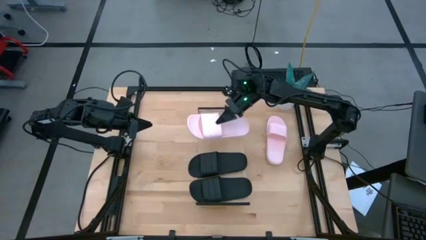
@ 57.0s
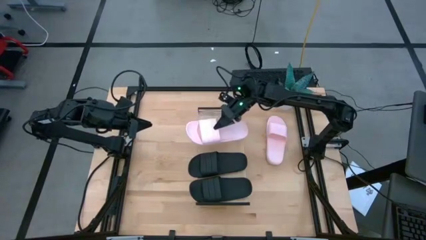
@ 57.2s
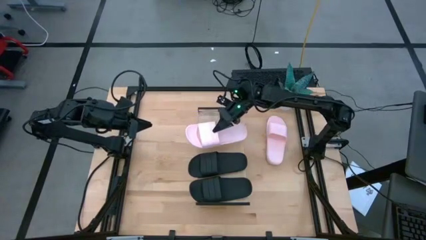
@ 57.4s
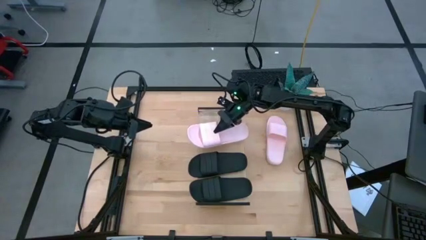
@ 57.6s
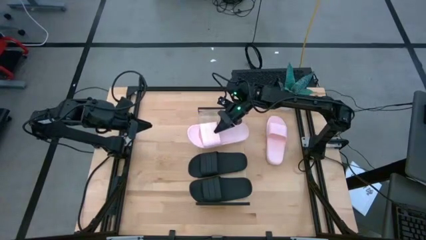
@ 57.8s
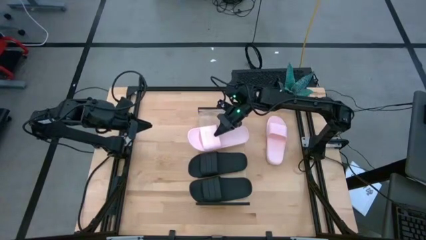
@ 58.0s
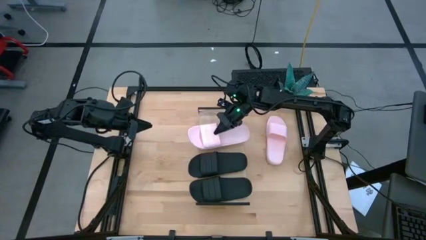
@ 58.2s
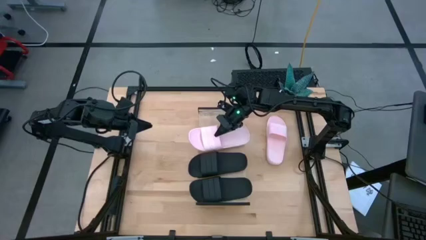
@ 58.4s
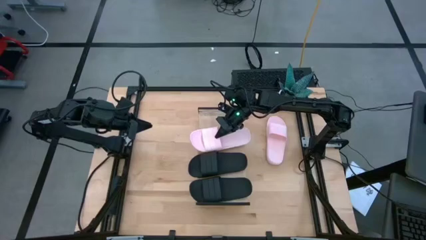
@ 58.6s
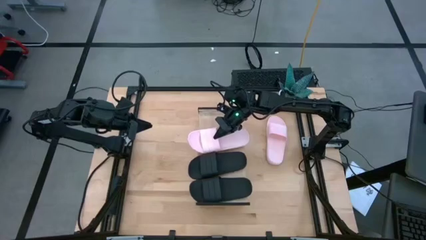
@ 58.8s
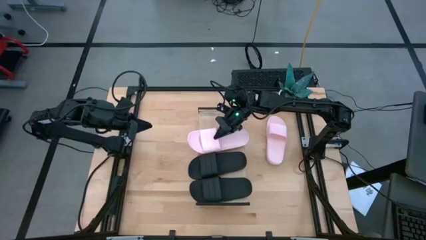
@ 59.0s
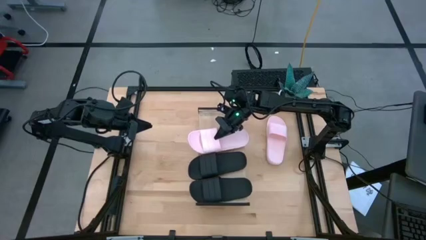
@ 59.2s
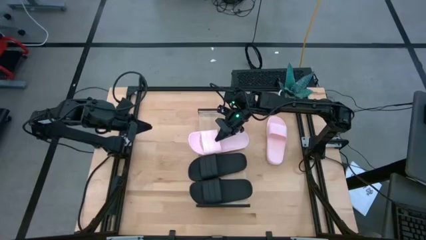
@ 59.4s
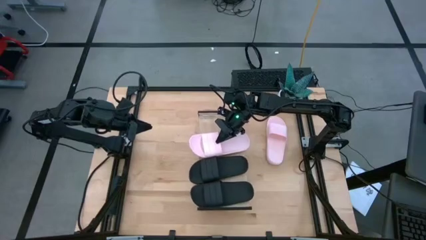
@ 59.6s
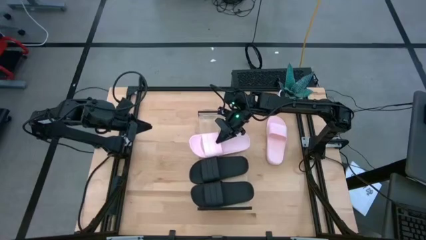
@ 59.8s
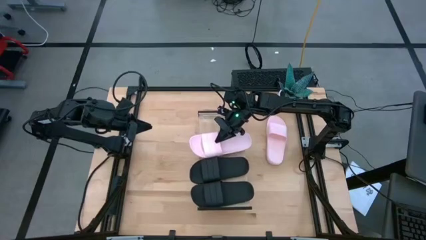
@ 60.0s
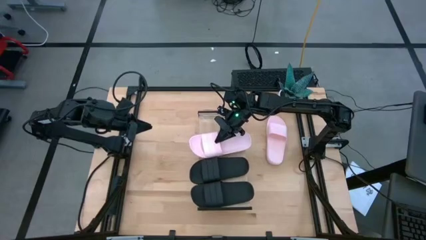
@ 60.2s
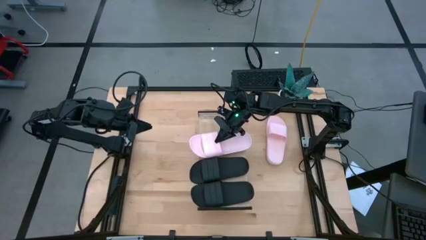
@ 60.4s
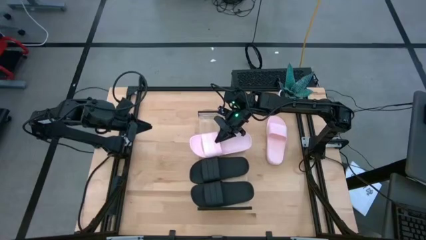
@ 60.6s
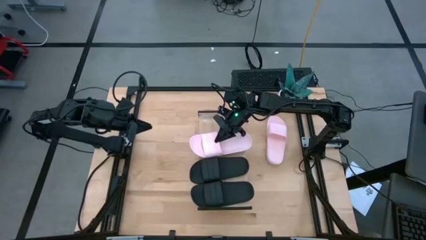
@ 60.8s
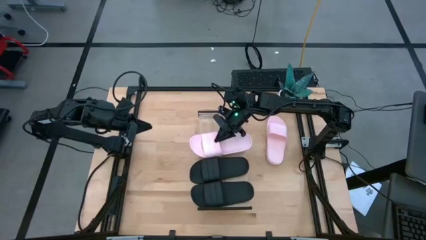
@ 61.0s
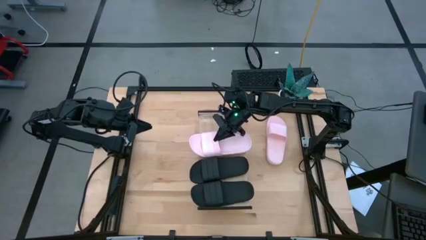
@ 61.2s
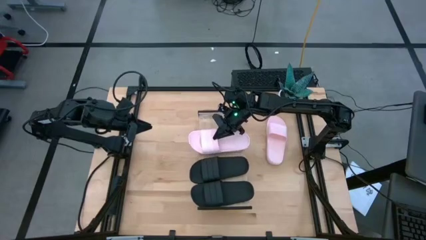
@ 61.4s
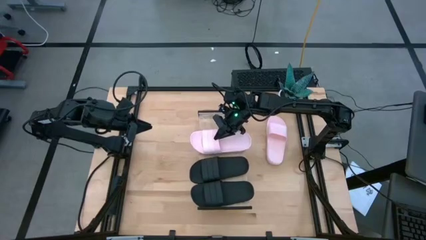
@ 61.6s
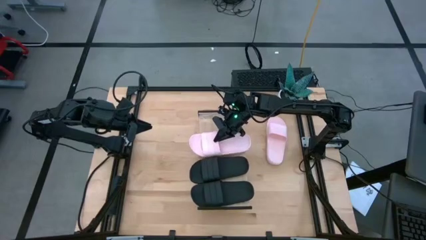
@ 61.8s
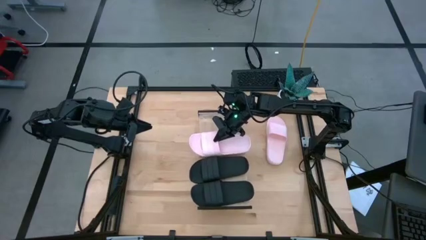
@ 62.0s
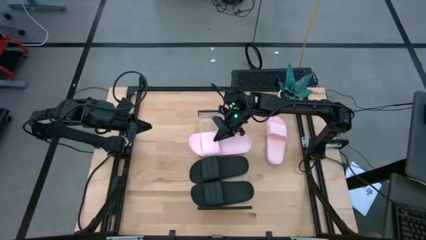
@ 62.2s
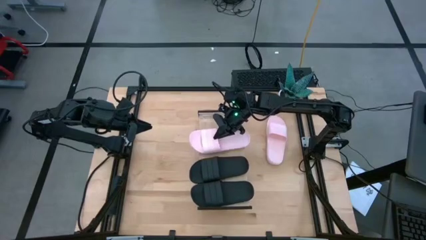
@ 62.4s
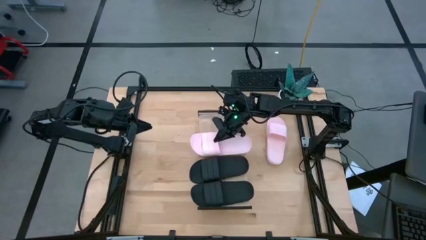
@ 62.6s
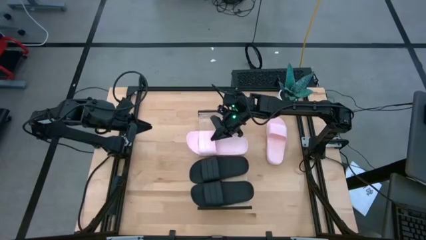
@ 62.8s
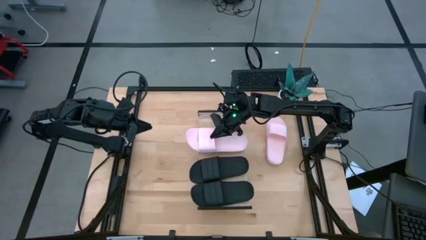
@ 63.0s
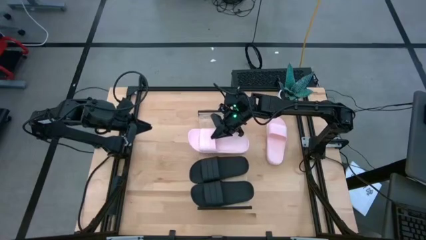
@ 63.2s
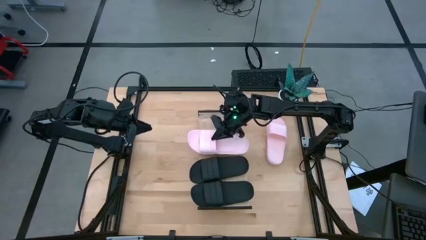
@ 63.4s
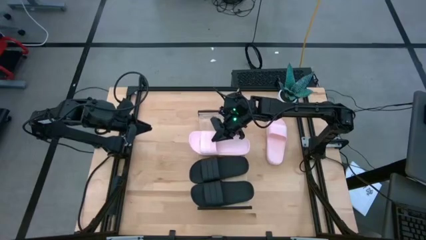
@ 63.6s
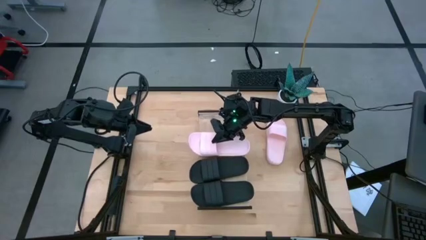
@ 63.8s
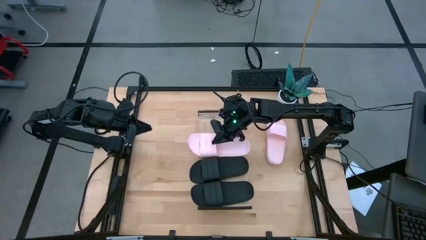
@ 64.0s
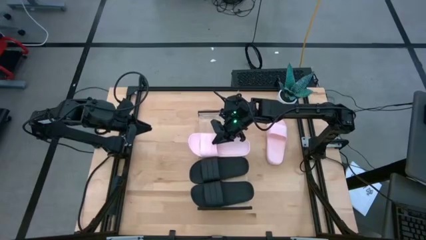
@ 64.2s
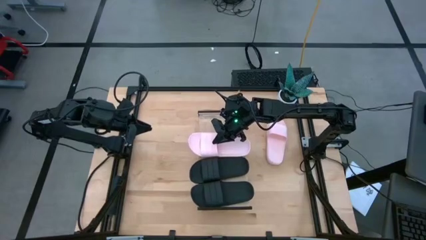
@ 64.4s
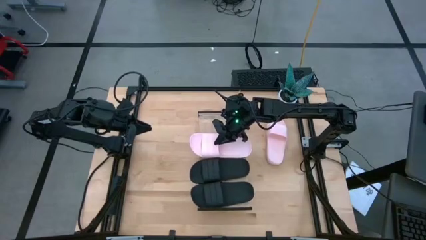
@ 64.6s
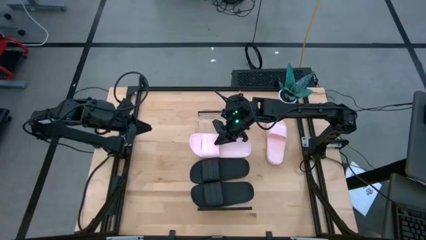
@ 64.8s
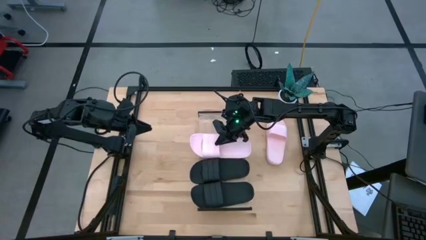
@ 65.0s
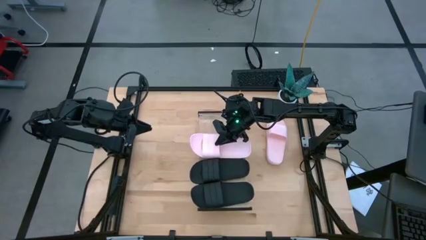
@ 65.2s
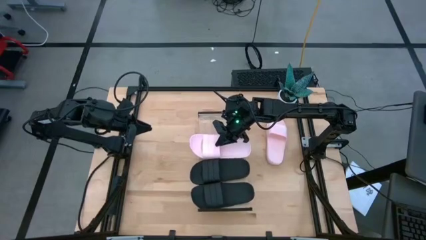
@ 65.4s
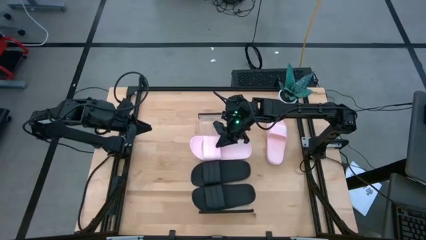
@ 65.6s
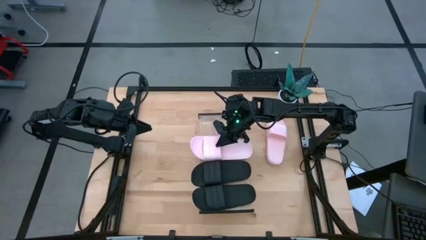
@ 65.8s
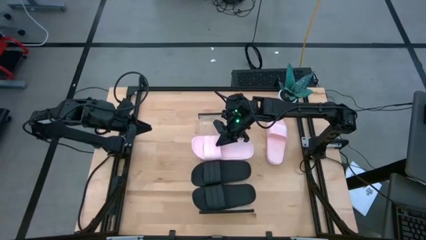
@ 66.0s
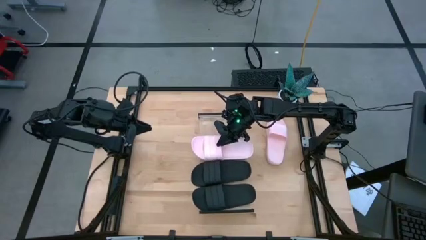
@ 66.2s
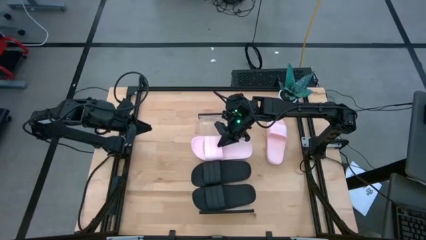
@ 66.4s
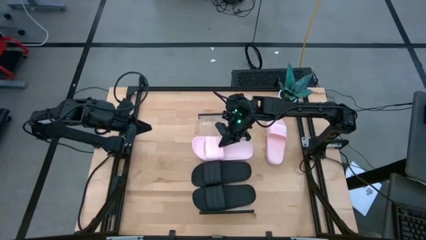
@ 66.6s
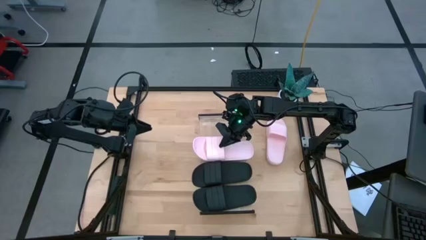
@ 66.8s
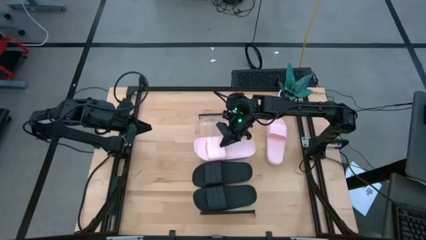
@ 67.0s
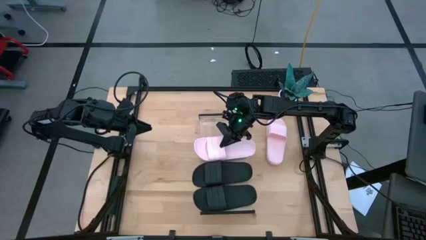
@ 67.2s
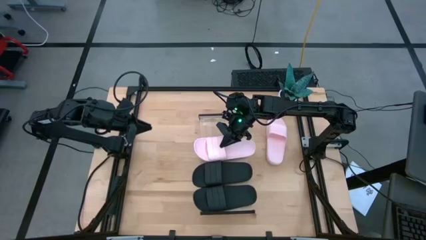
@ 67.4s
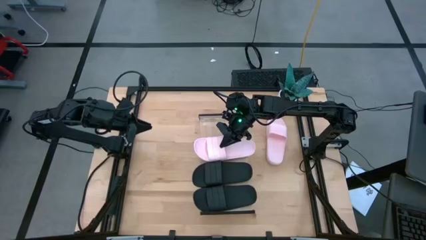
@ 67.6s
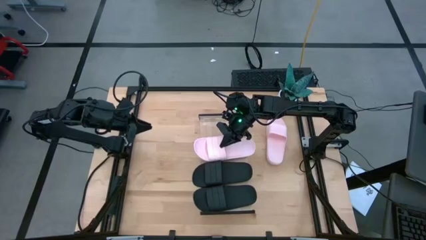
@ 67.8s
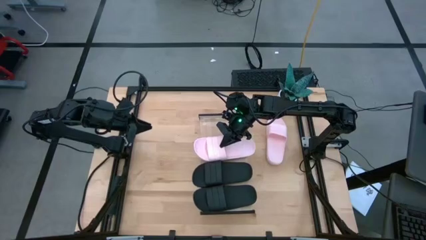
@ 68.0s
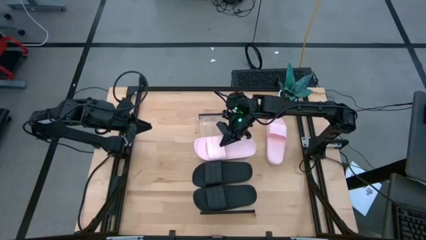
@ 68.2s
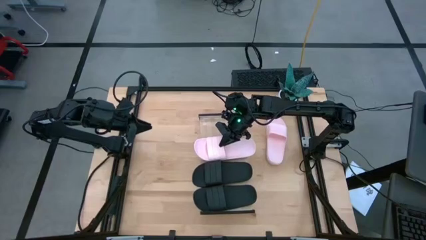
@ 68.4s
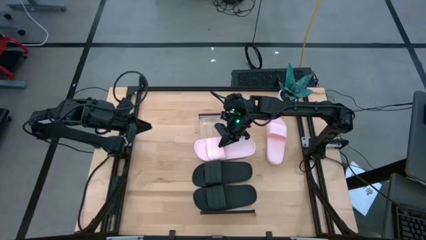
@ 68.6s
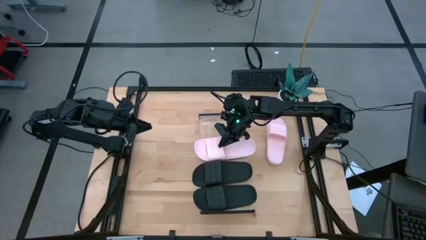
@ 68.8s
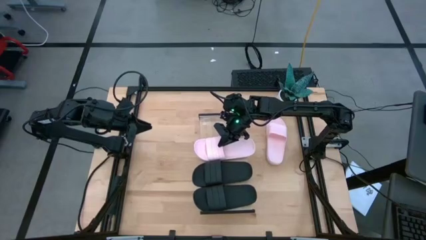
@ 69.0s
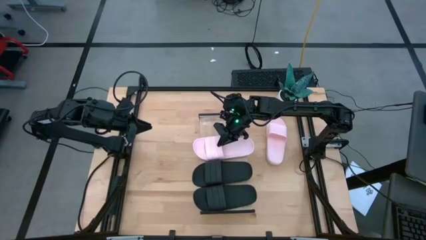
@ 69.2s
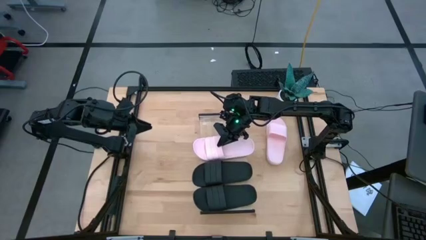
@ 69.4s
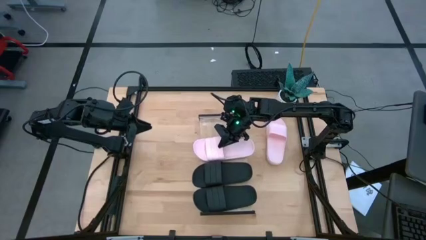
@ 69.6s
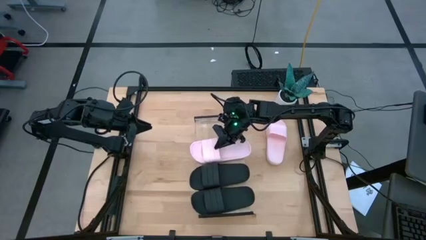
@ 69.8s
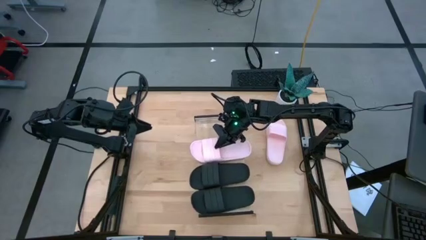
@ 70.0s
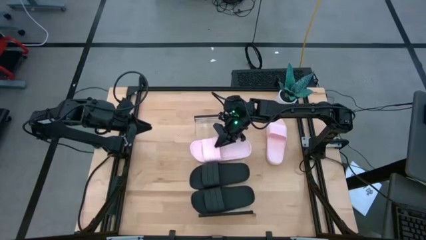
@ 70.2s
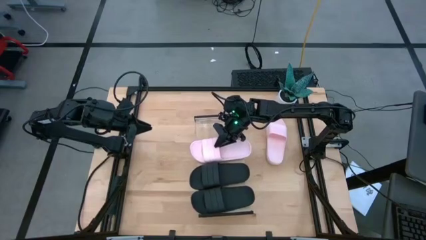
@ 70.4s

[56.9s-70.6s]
Task: Pick and place slides into the shelf
Put the left pink slides on the shelf

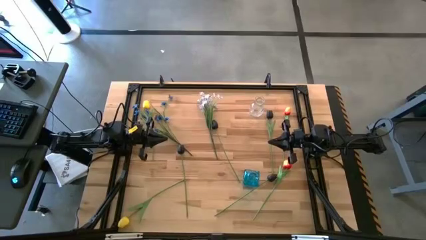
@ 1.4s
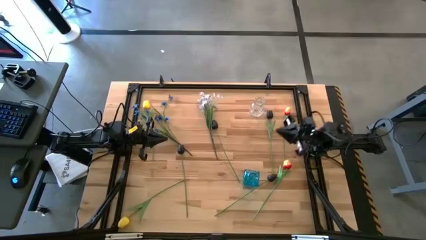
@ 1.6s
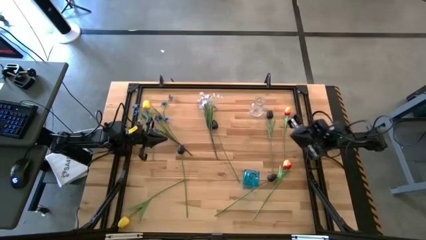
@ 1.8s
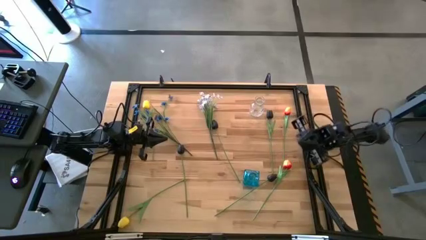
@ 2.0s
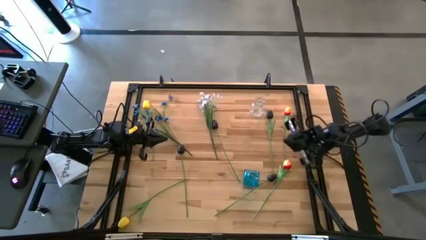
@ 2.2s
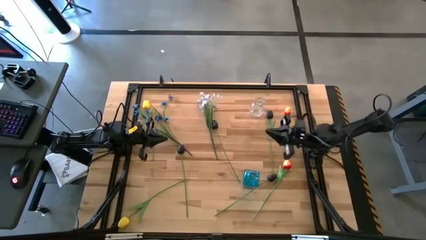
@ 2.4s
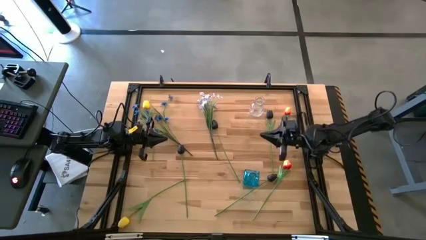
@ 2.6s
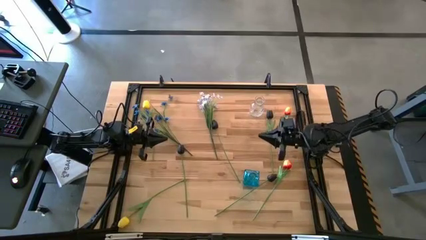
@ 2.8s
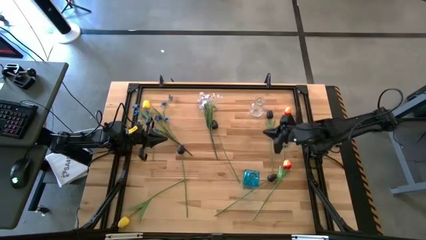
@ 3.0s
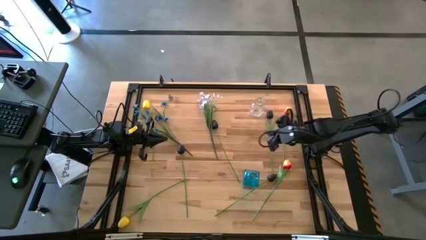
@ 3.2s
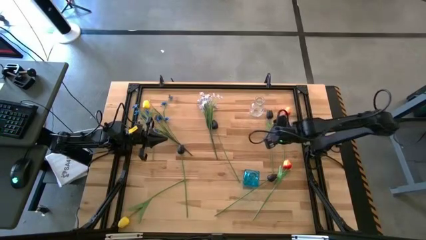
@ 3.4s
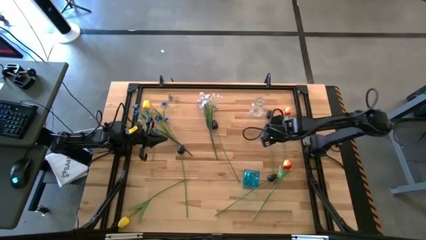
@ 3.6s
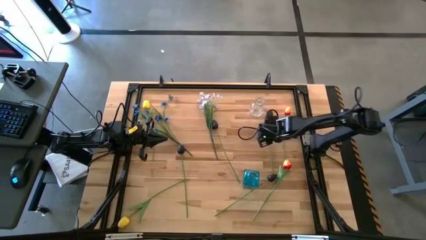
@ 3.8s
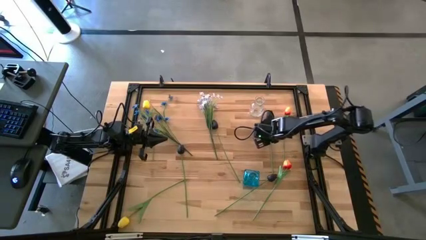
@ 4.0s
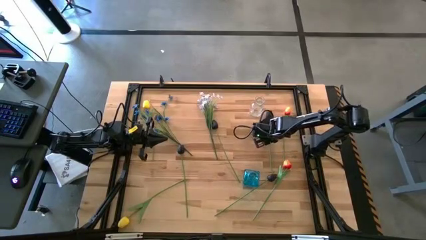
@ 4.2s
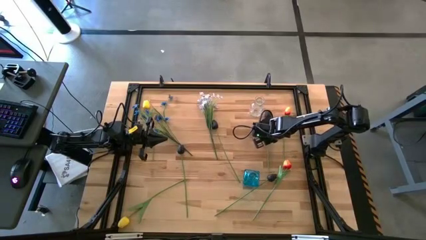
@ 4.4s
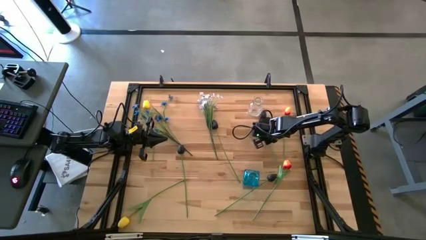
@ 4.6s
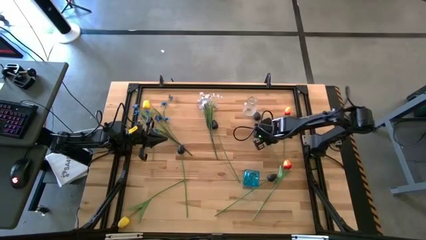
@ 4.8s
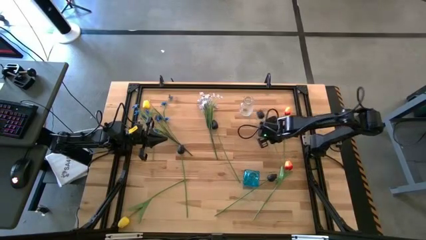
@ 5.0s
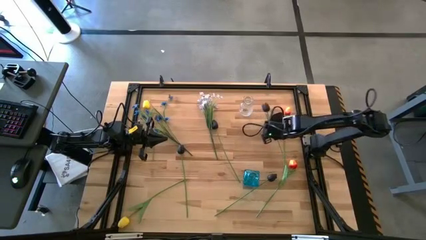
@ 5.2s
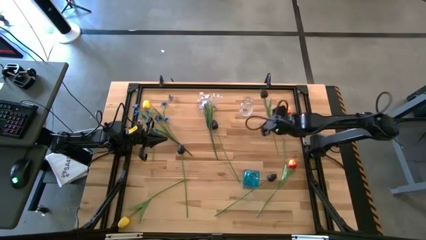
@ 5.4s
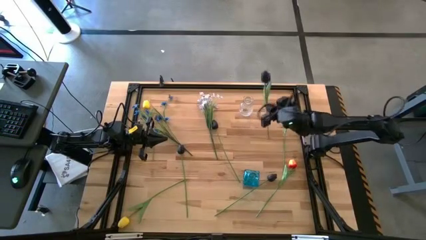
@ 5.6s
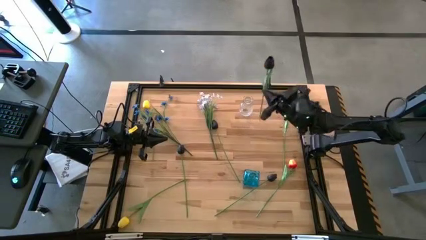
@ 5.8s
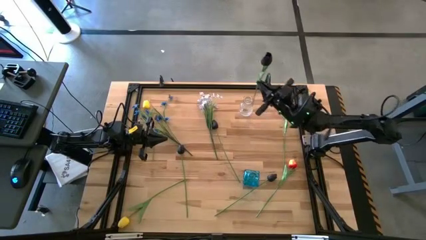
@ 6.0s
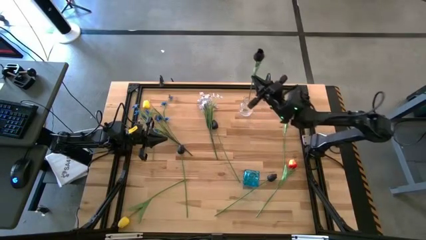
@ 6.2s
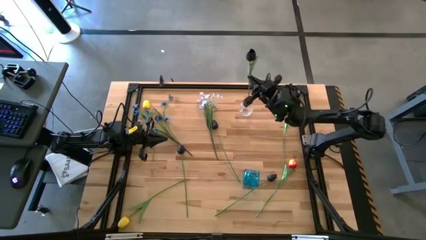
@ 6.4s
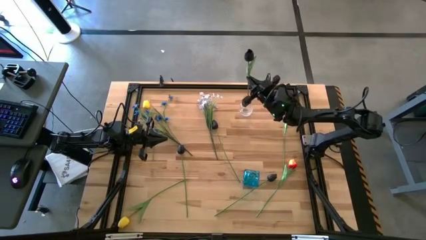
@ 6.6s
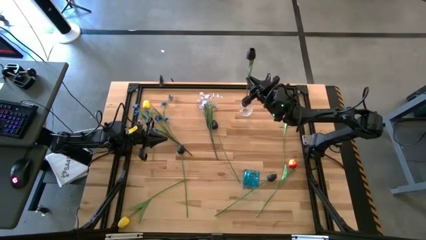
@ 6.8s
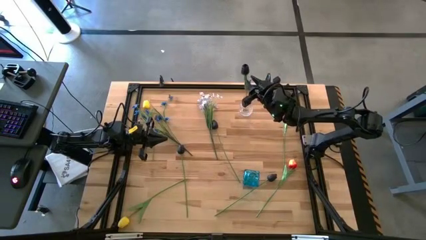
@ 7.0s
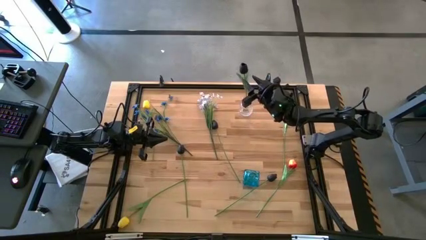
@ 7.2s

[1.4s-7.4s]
Task: Sort flowers into vase by color
Put the black tulip into the transparent flower vase
